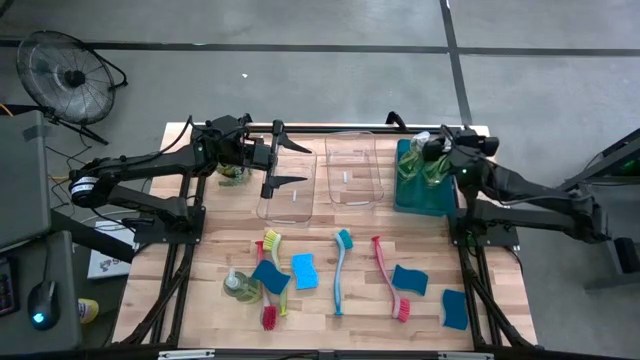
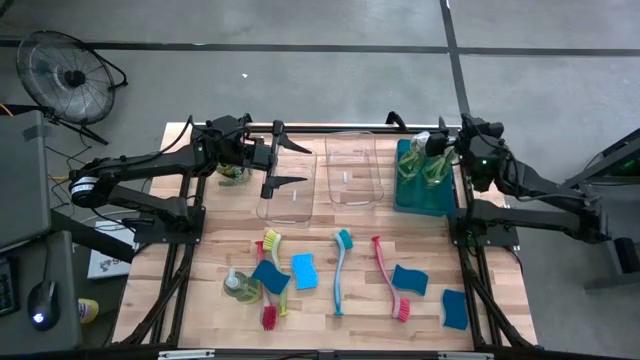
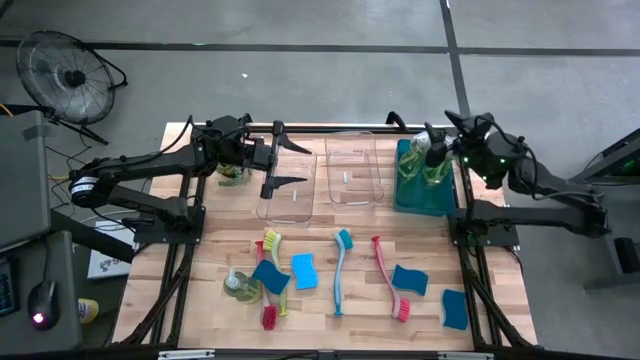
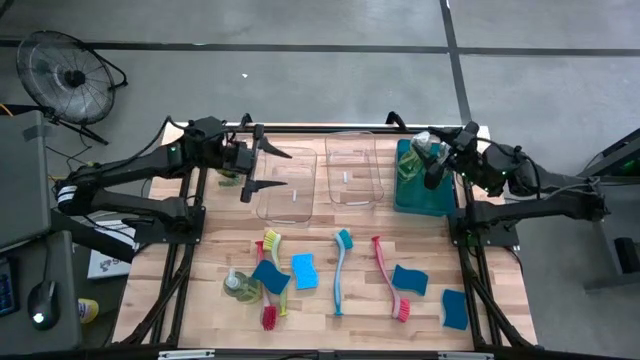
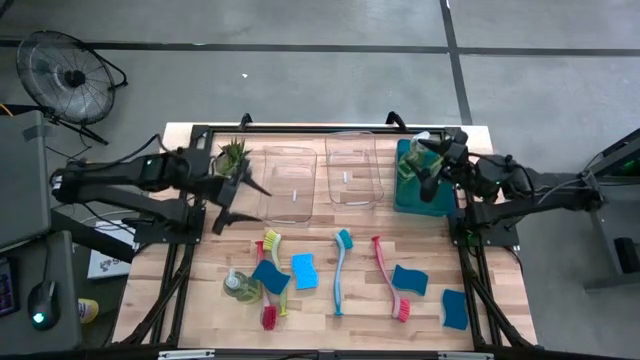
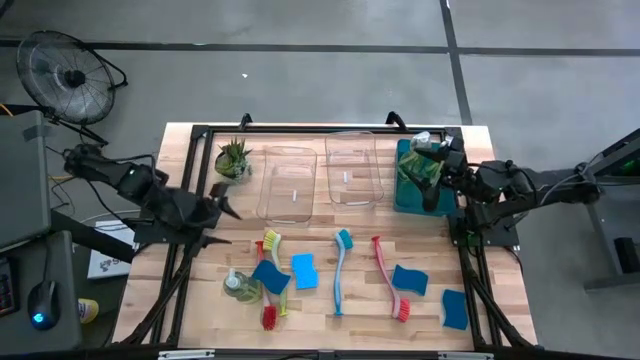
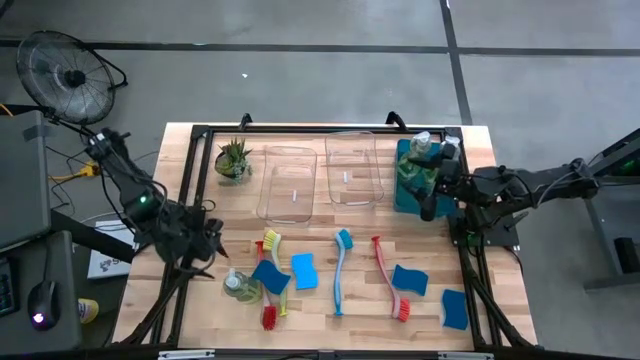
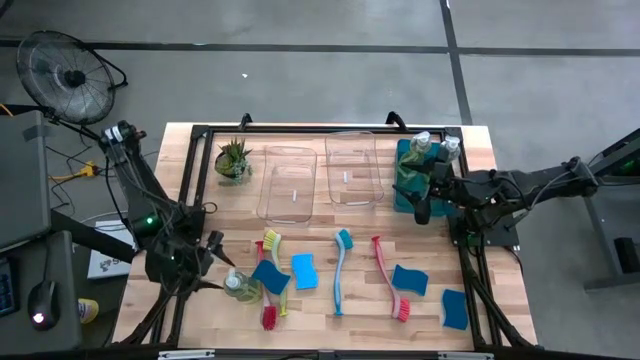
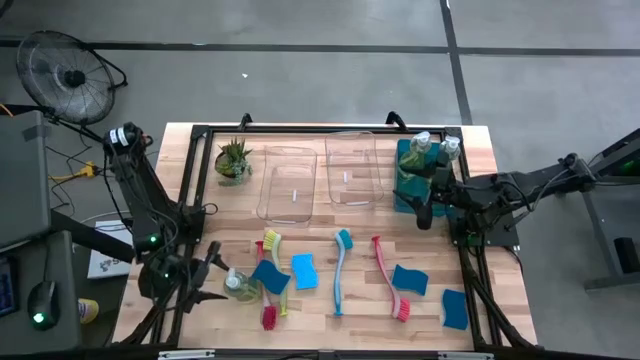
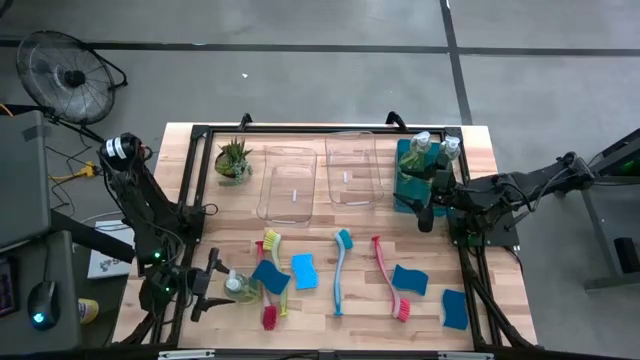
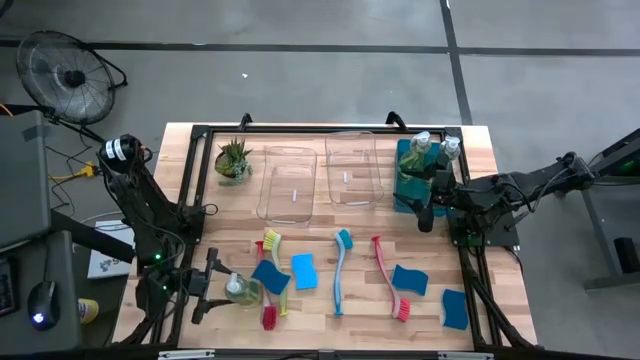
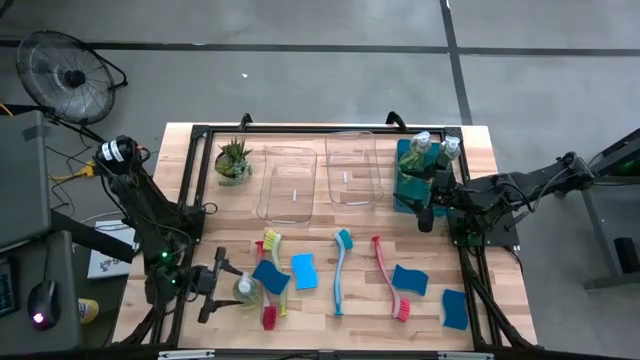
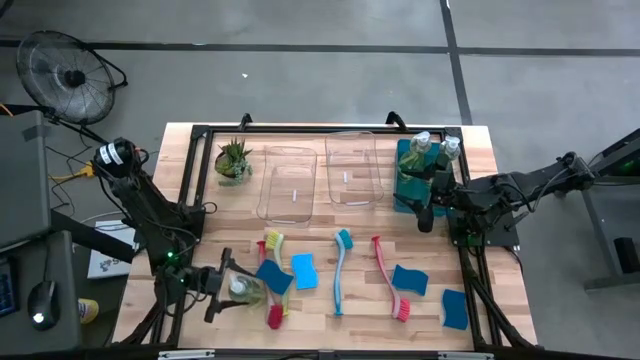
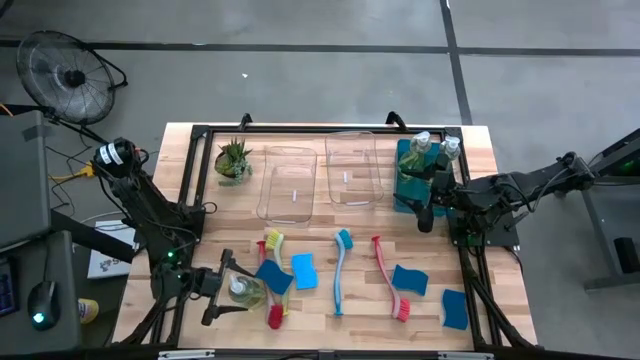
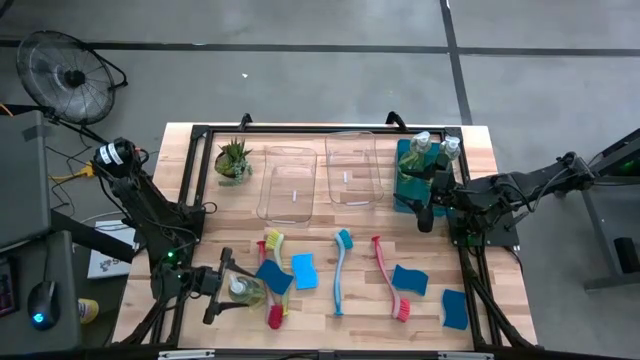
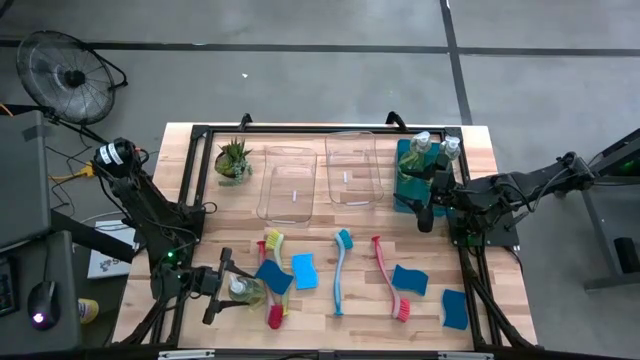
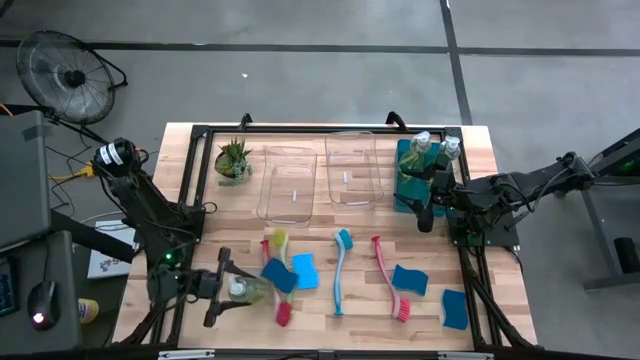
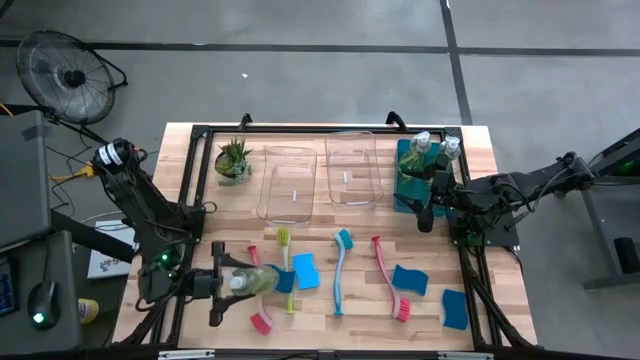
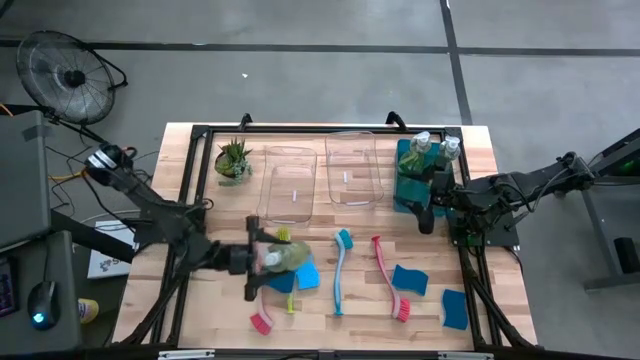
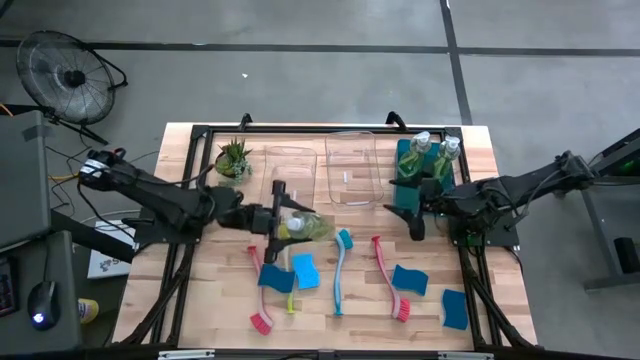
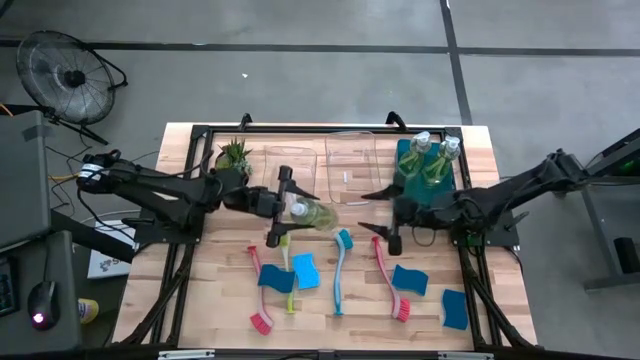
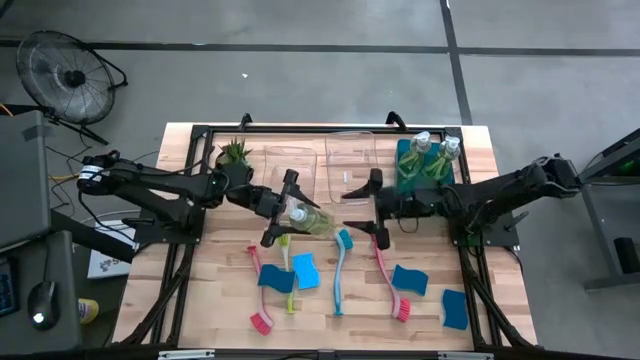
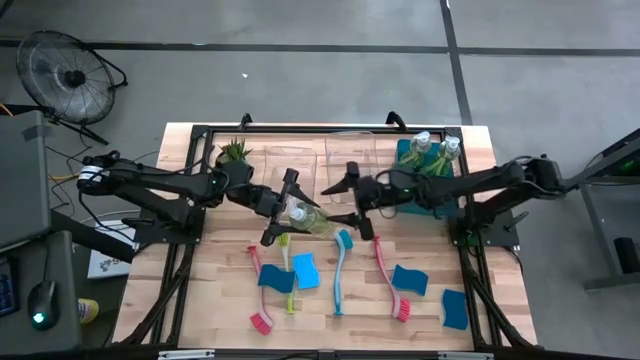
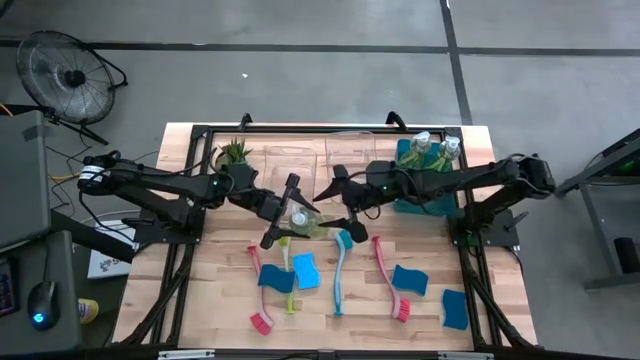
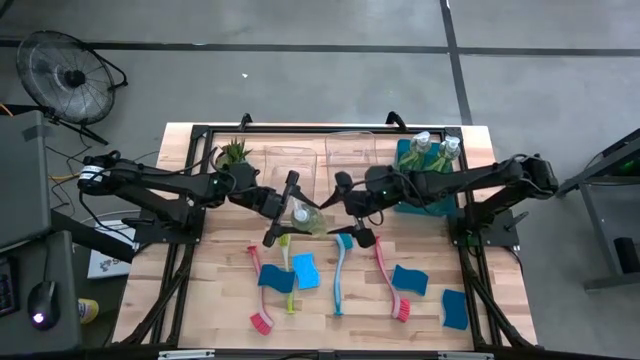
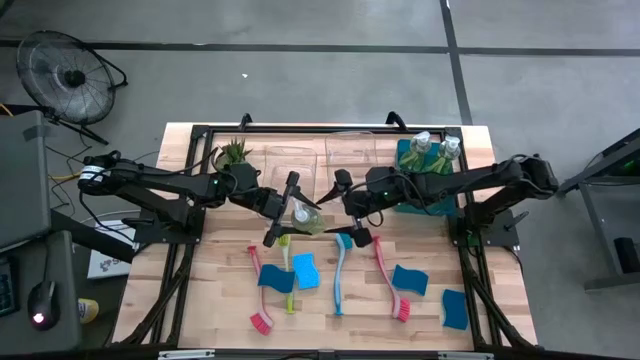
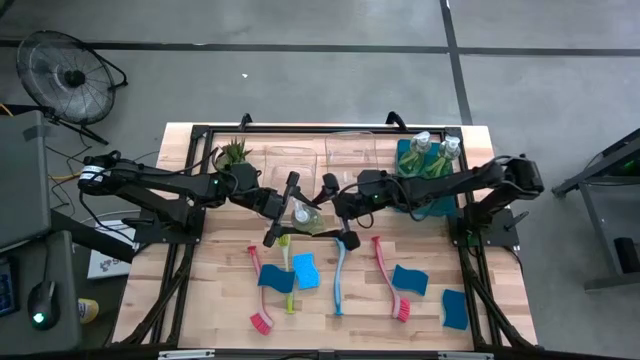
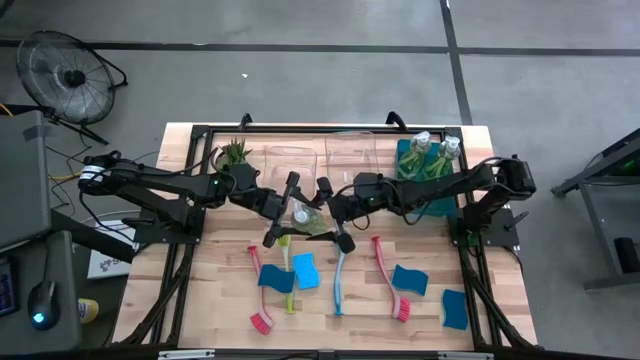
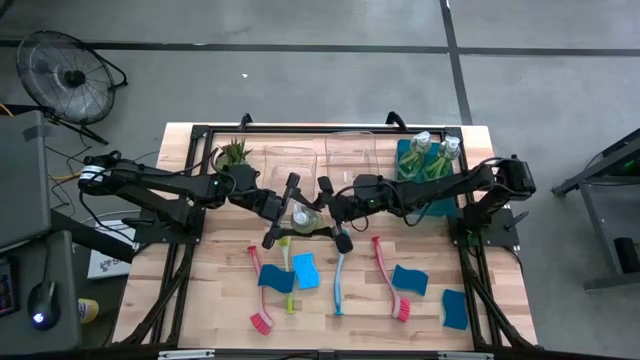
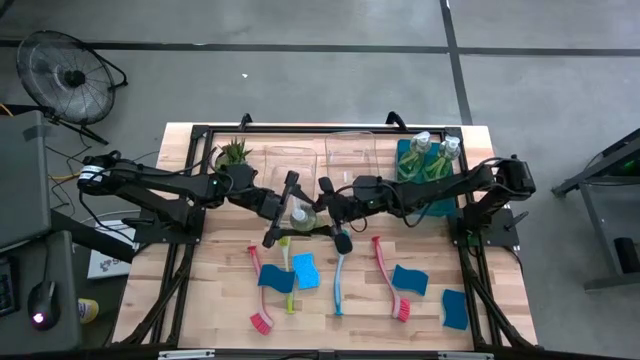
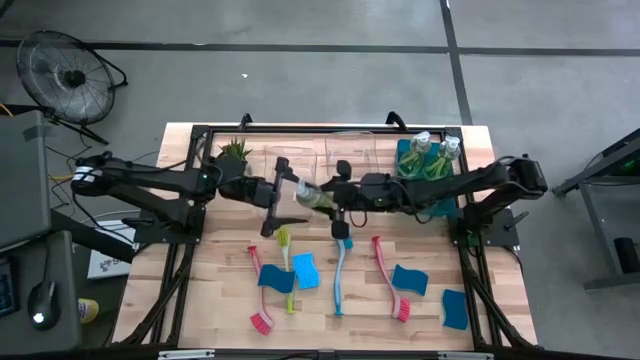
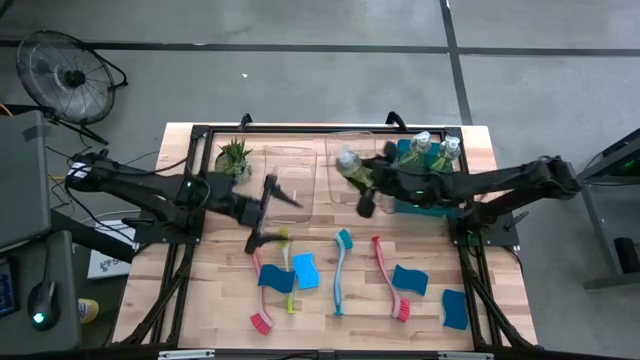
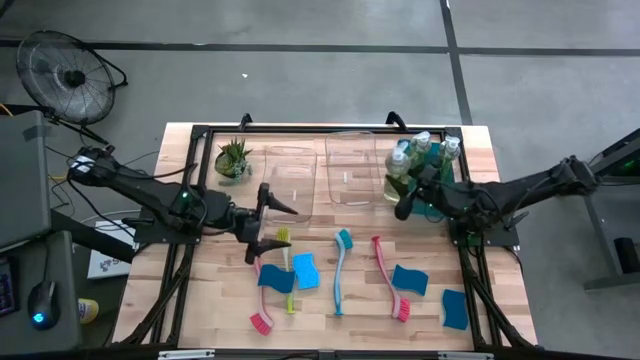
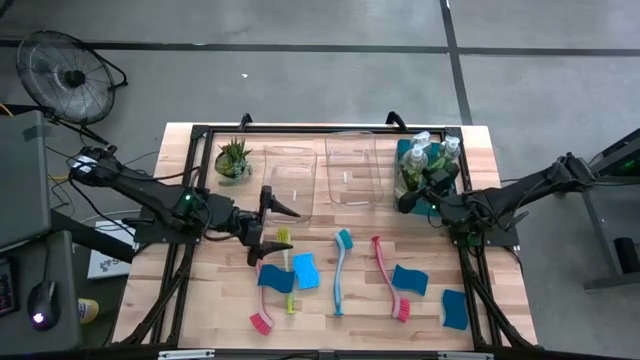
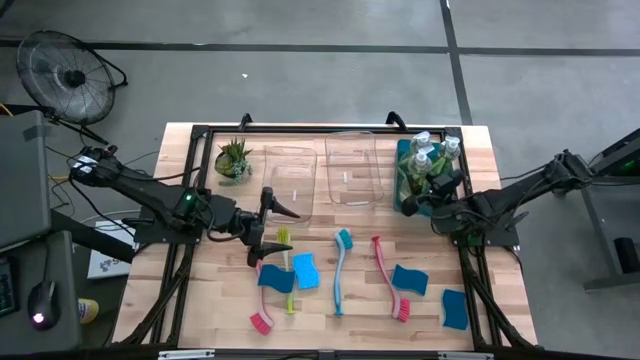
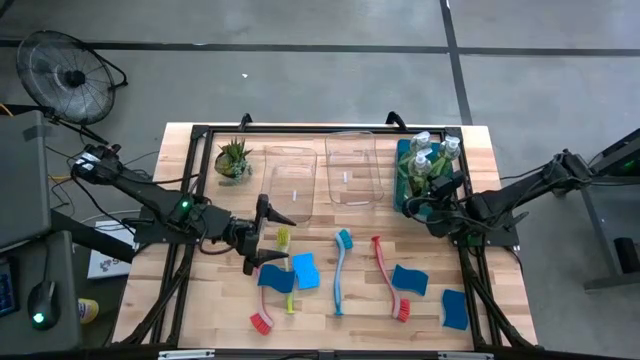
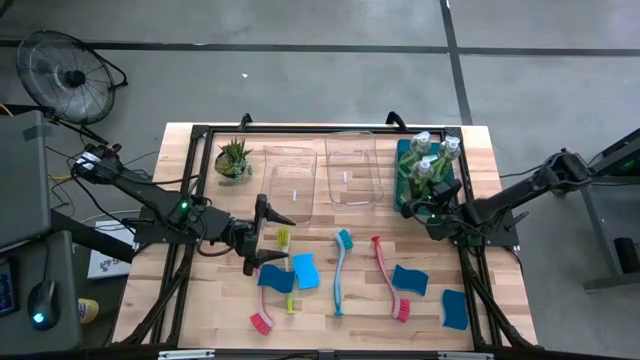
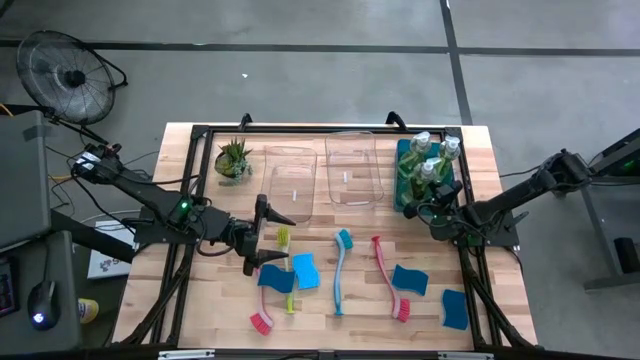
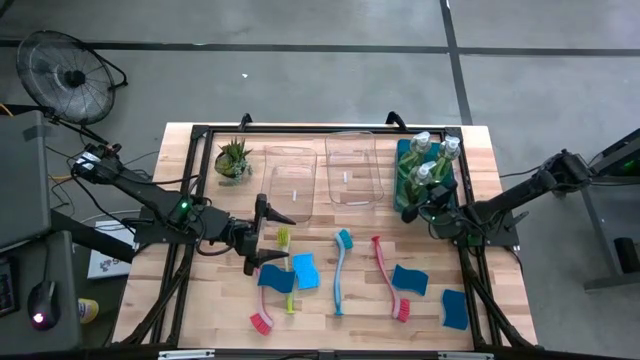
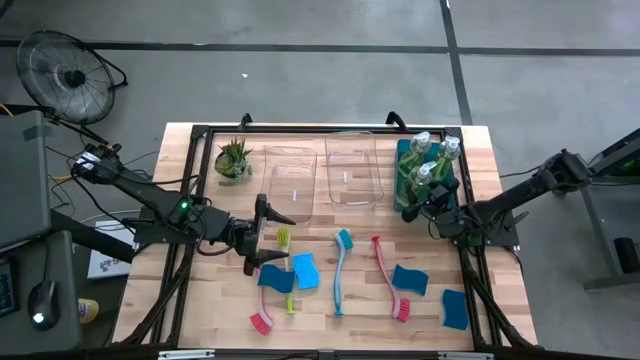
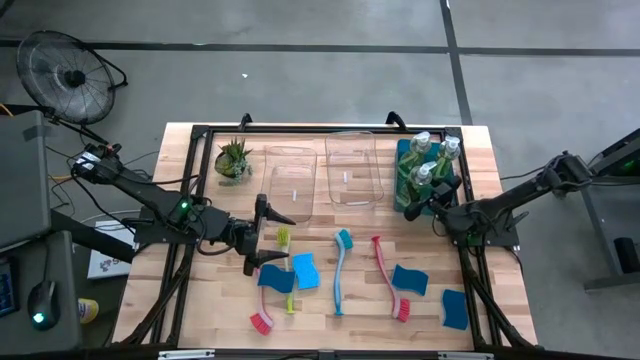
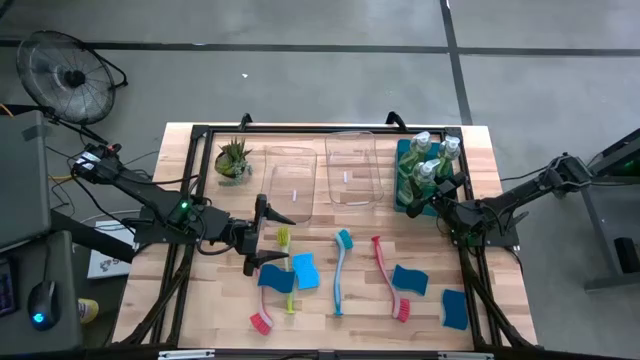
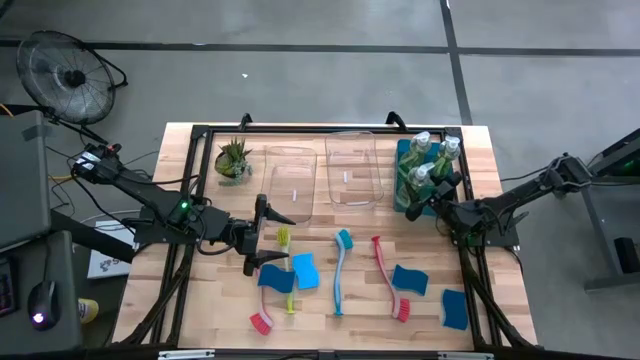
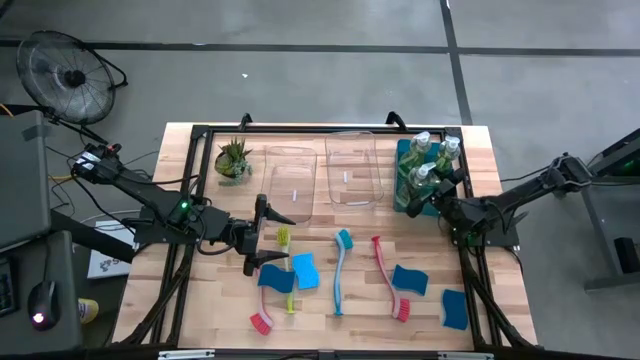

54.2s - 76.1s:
Task: Pick & Place Kitchen Sink Supplies
Put the green dishwashing liquid dispenser into the blue bin
